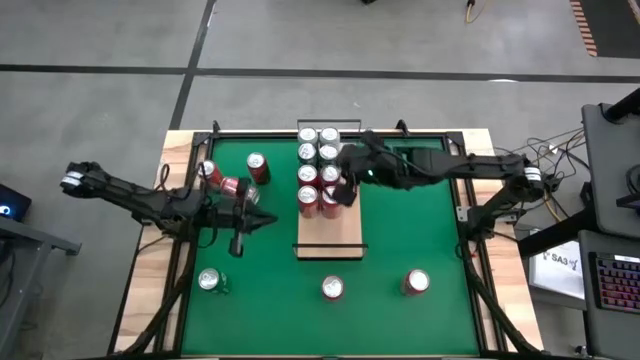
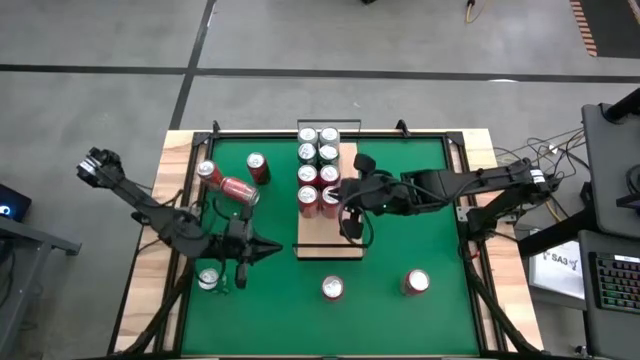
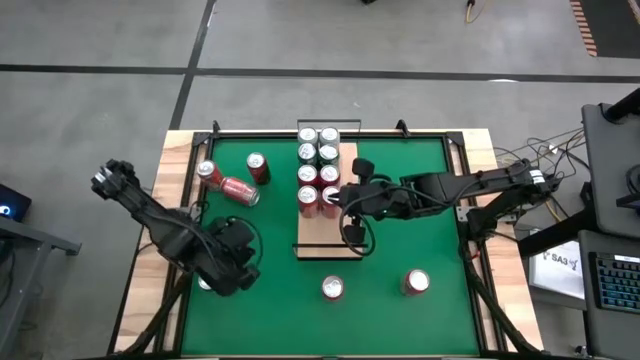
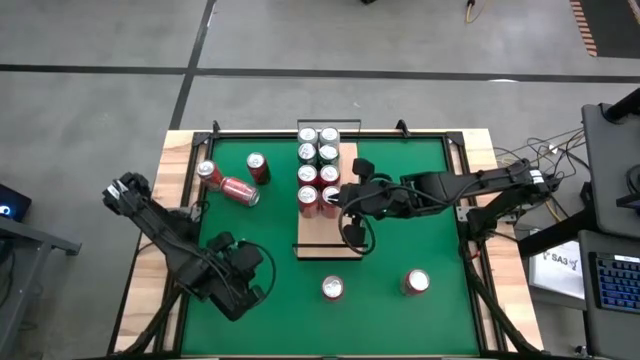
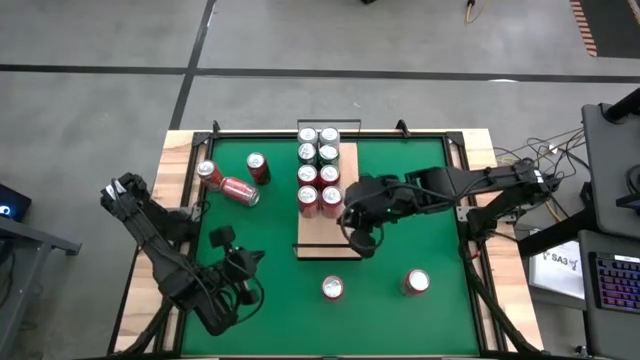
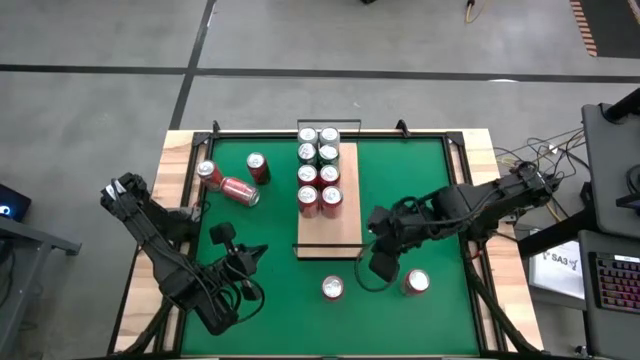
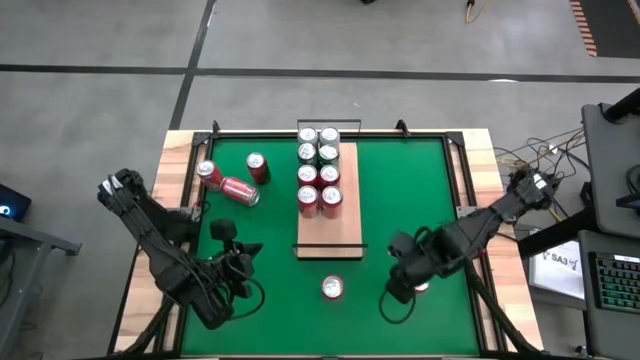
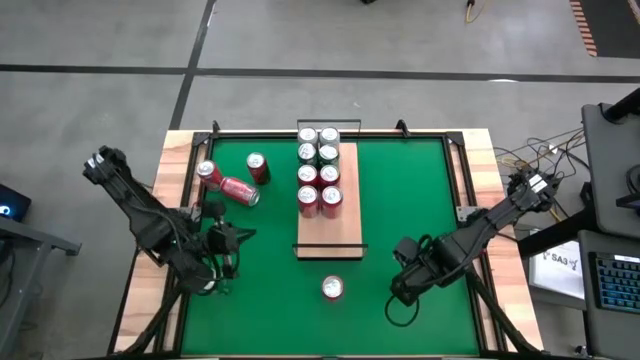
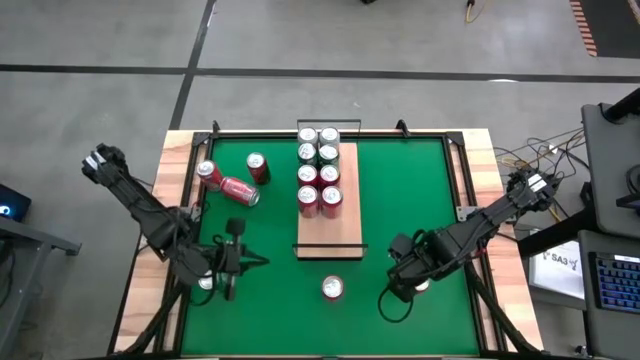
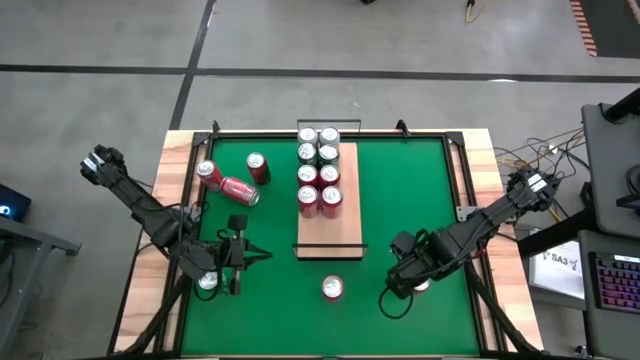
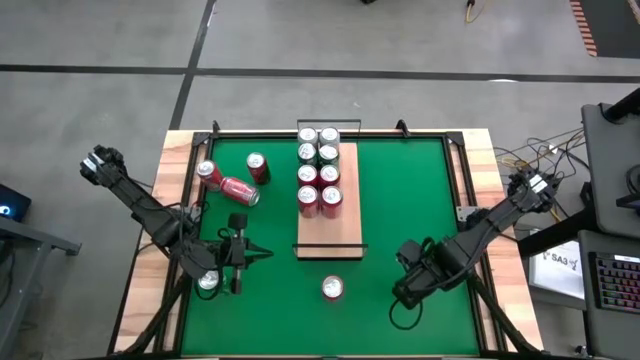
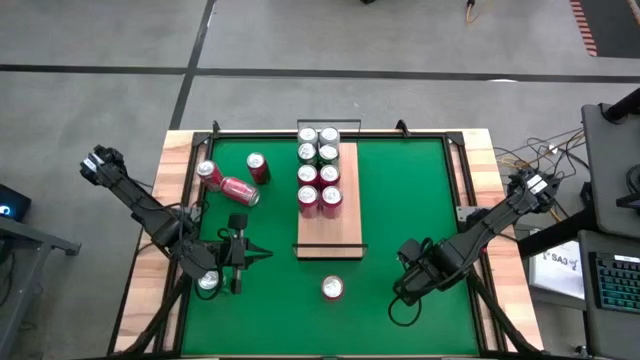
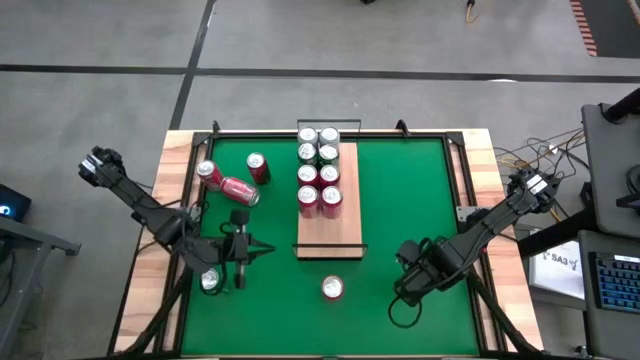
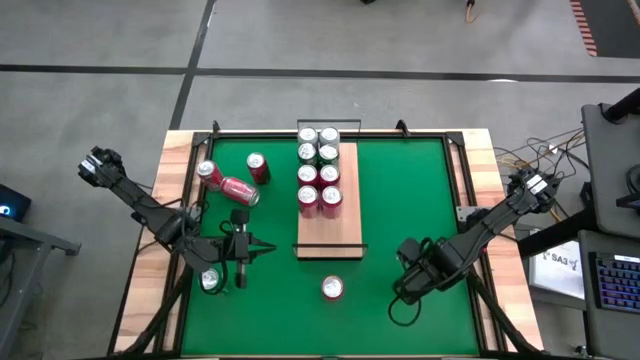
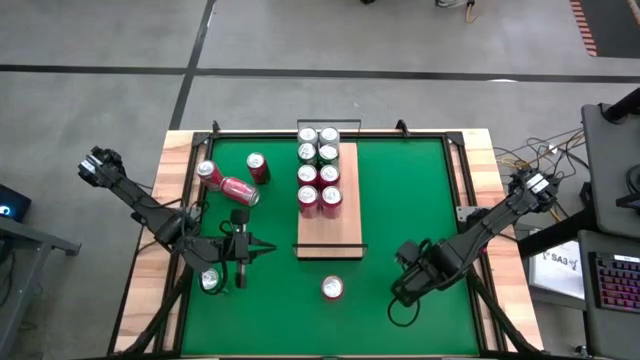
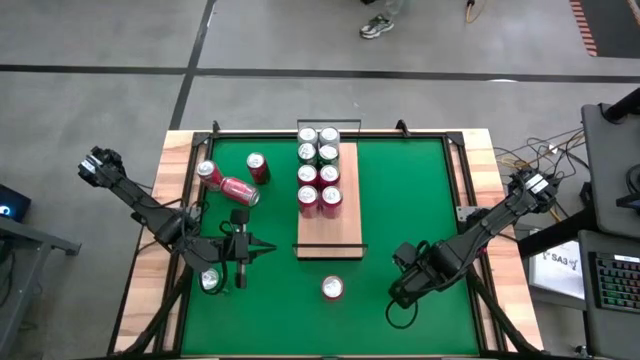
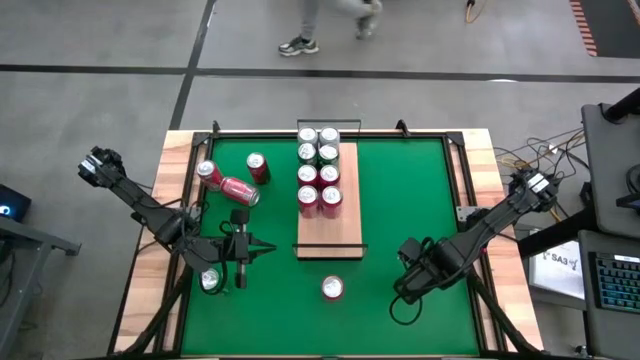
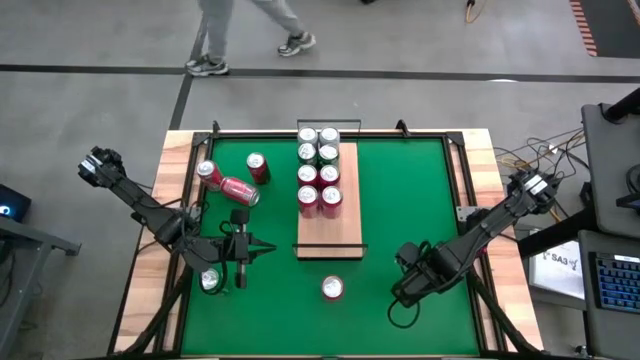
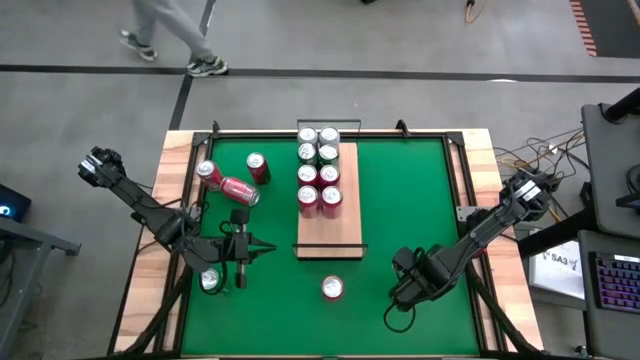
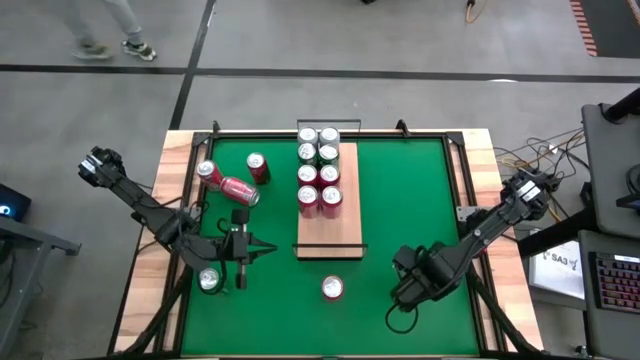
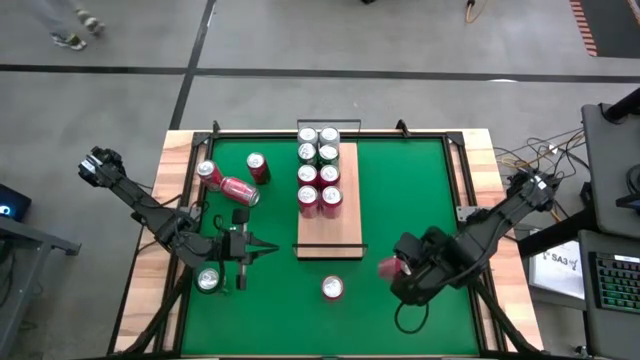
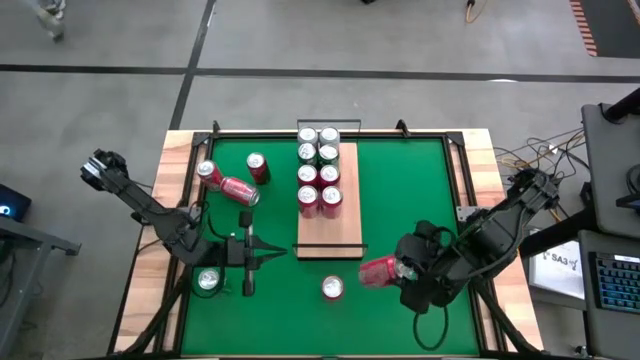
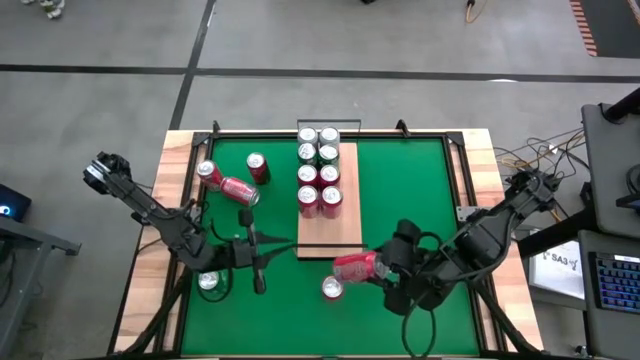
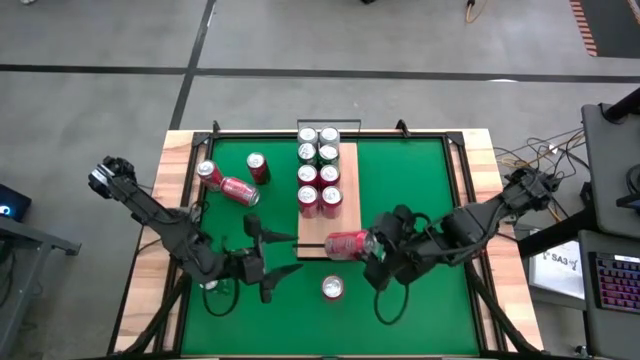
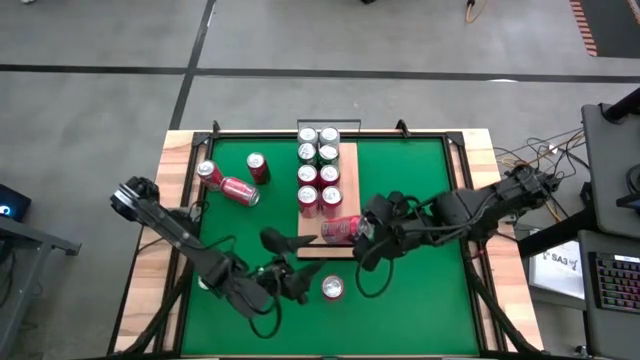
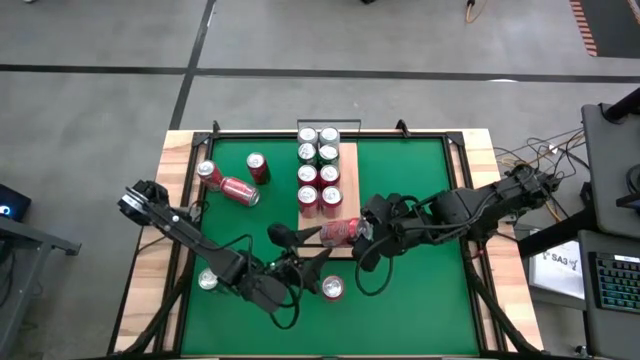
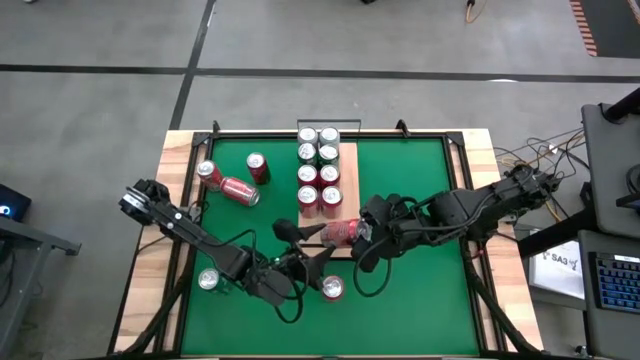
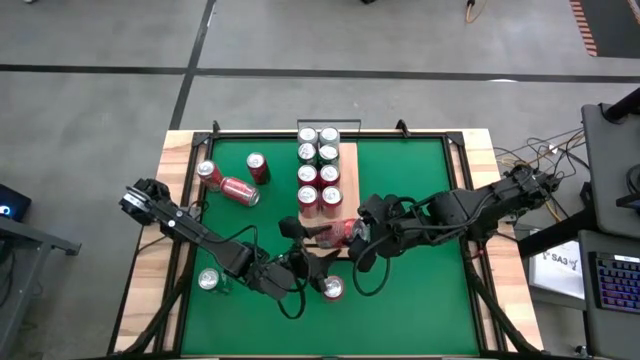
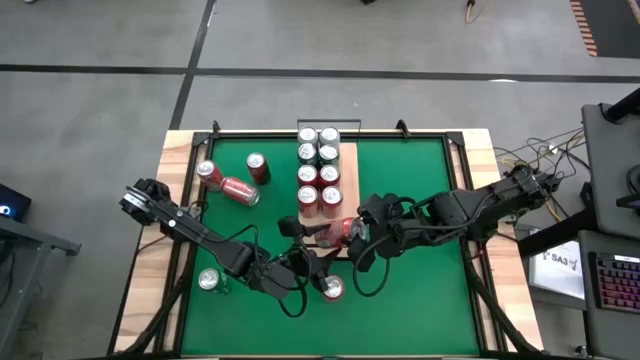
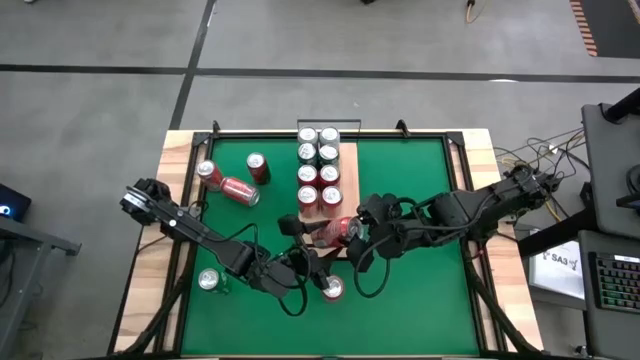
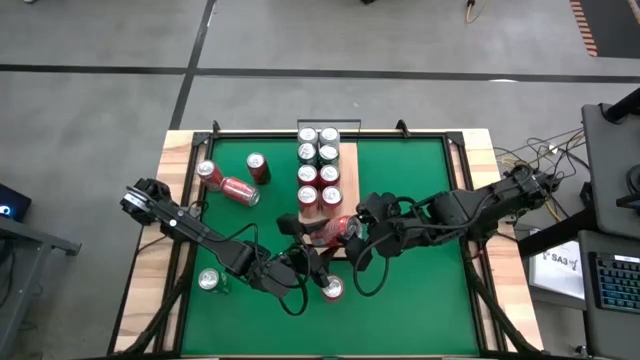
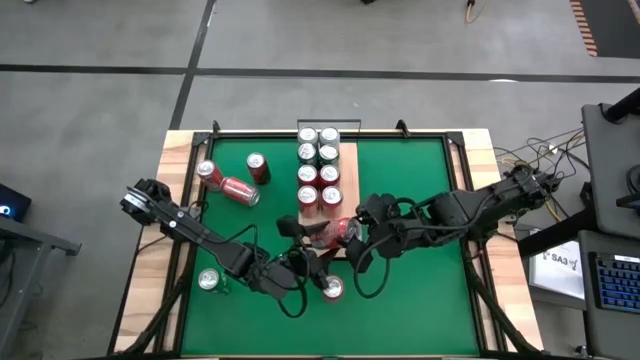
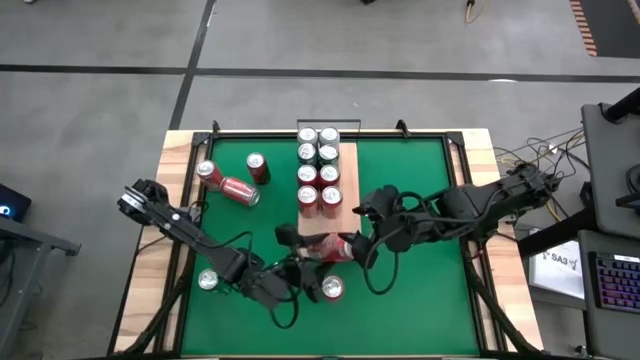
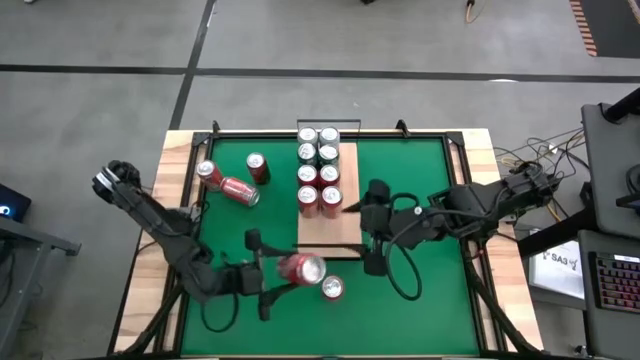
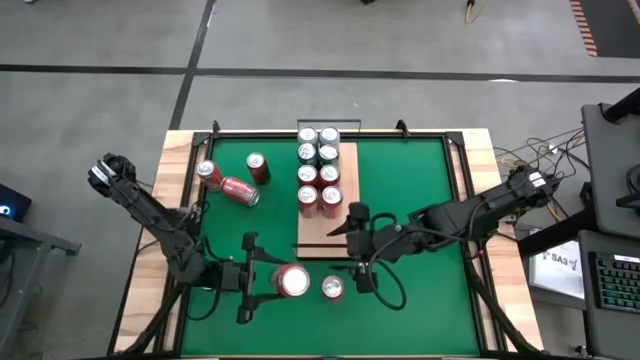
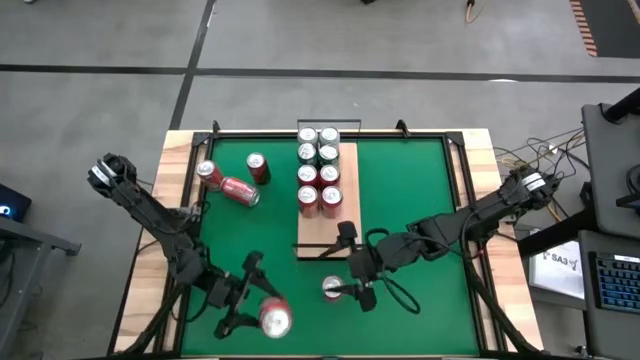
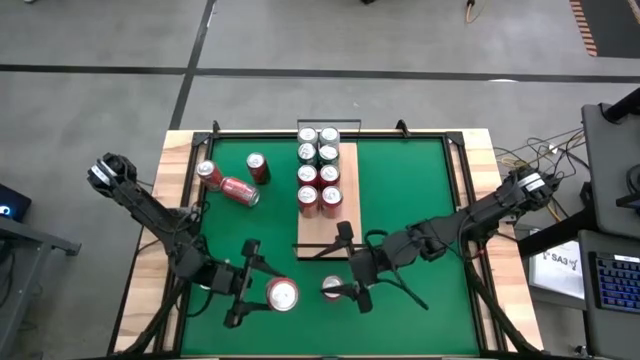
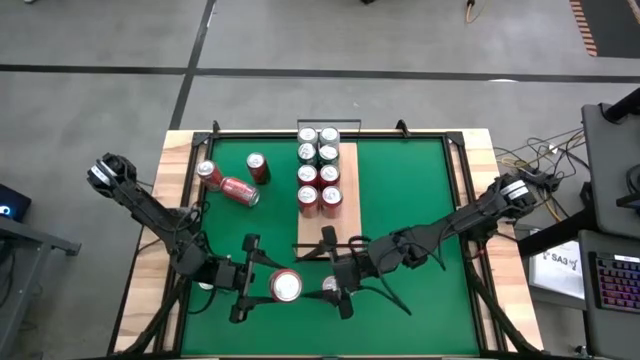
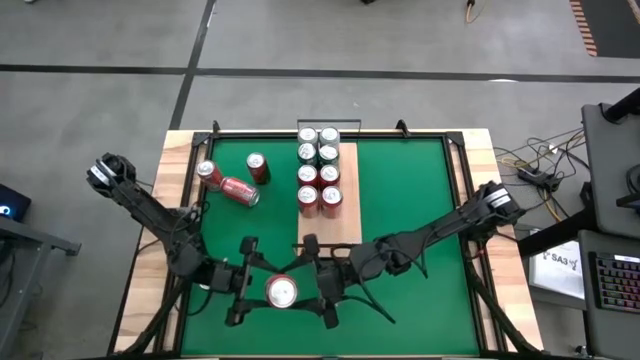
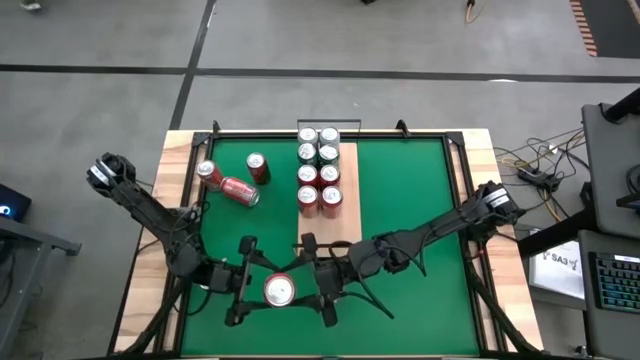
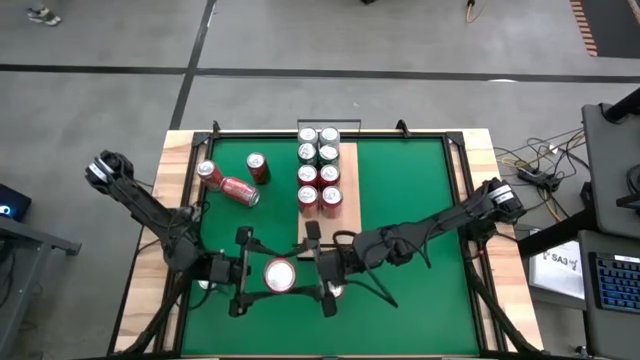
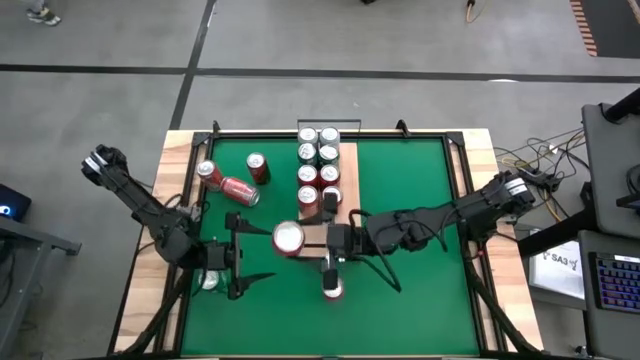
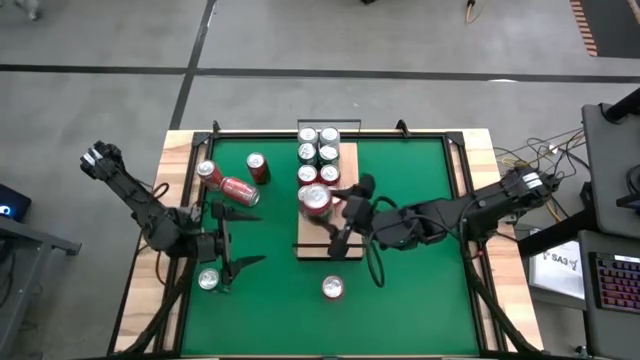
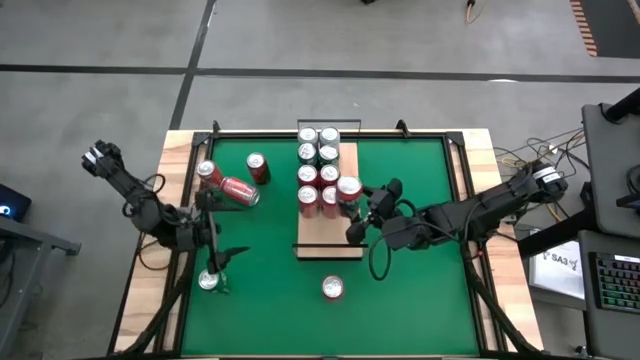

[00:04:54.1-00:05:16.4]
Task: Place canned beverage on shelf
Put the orange soda can on the shelf and aligned with the other orange soda can
